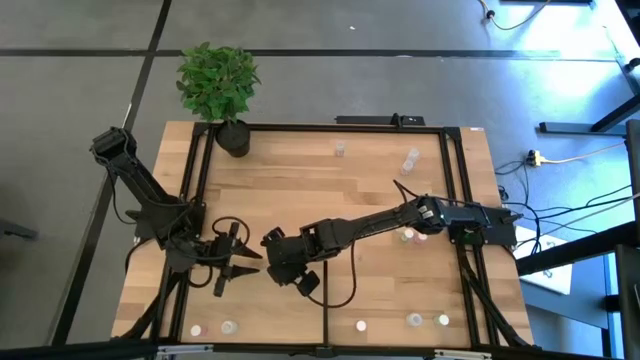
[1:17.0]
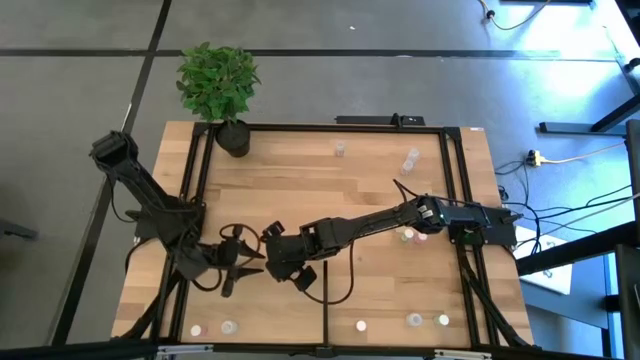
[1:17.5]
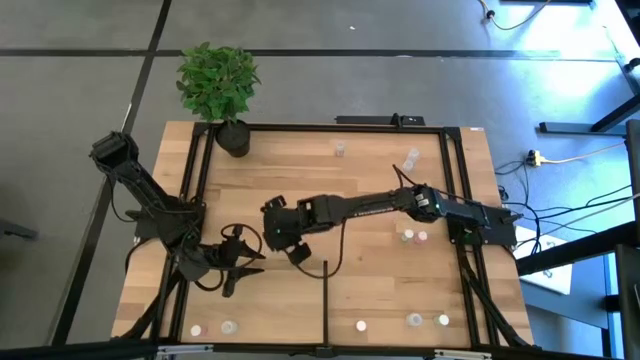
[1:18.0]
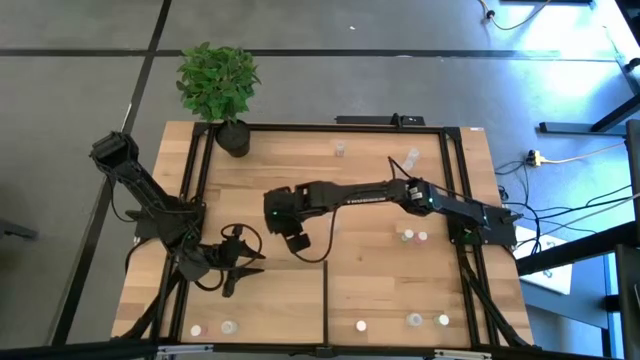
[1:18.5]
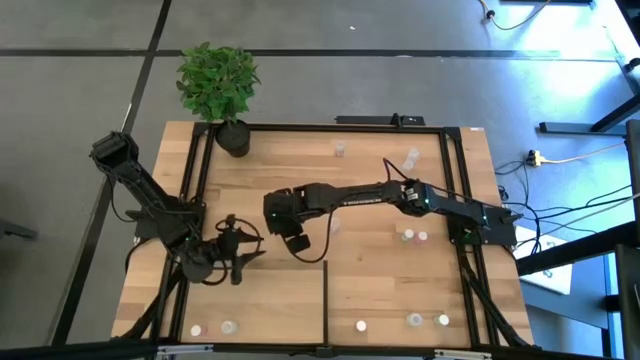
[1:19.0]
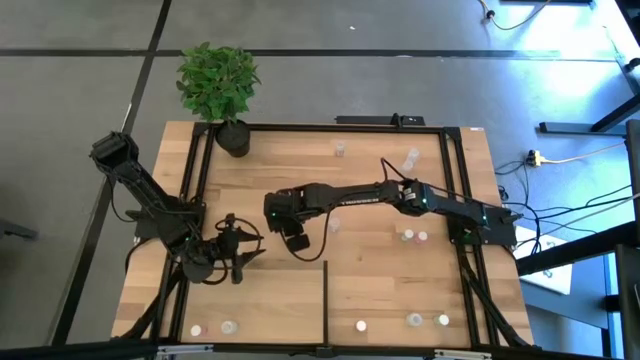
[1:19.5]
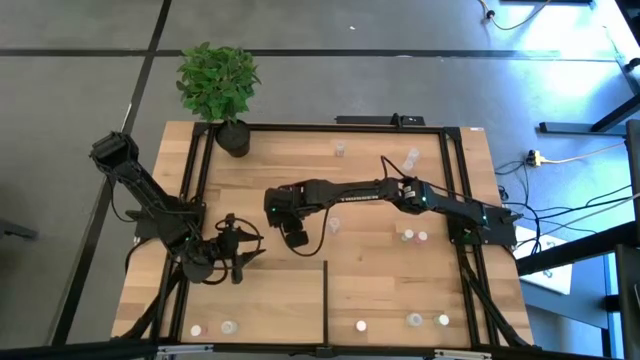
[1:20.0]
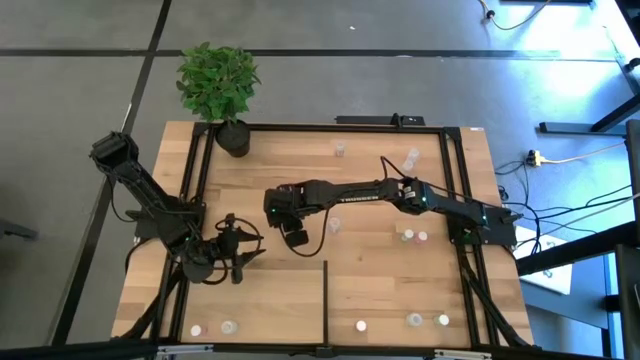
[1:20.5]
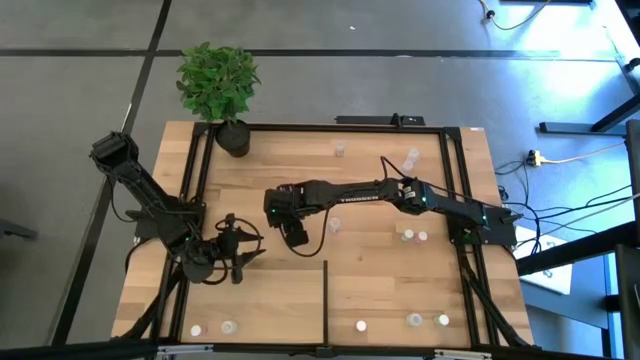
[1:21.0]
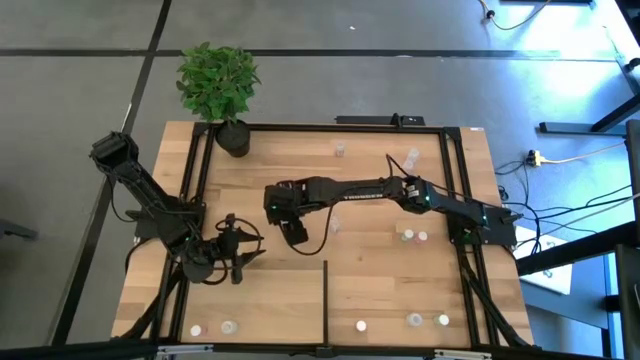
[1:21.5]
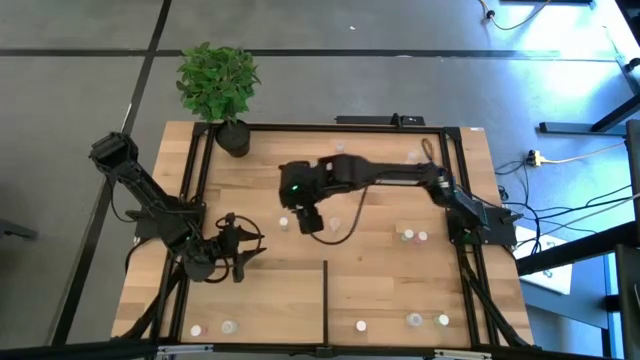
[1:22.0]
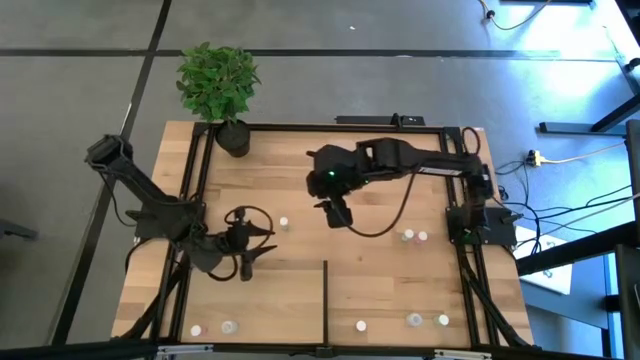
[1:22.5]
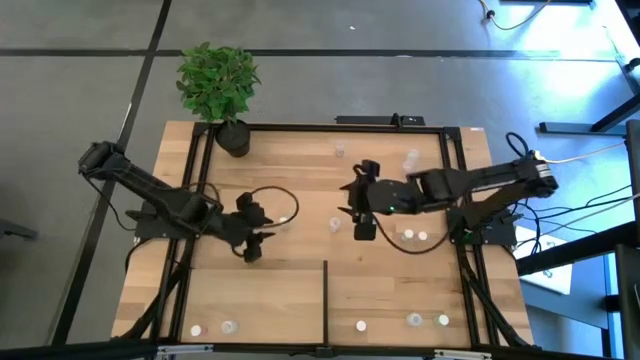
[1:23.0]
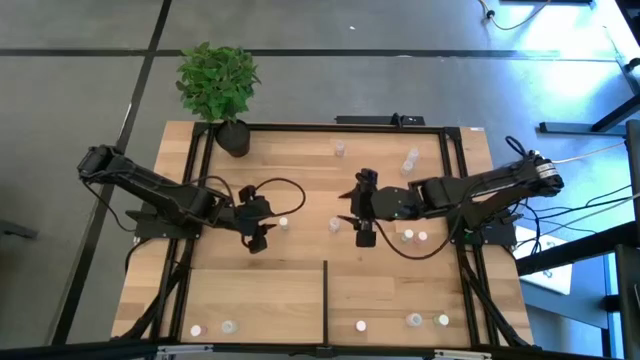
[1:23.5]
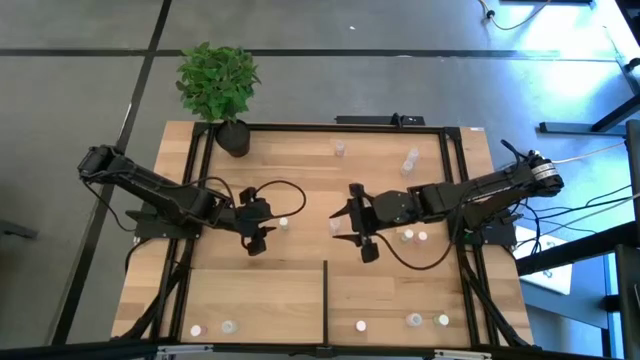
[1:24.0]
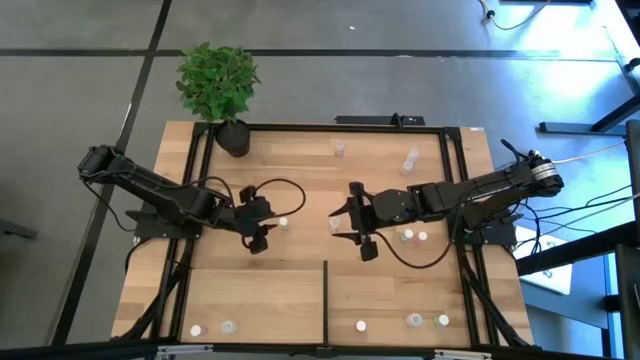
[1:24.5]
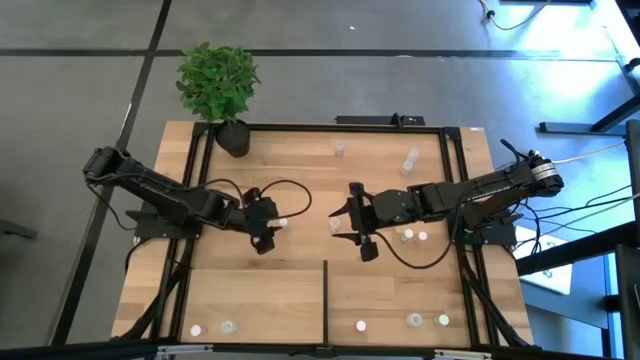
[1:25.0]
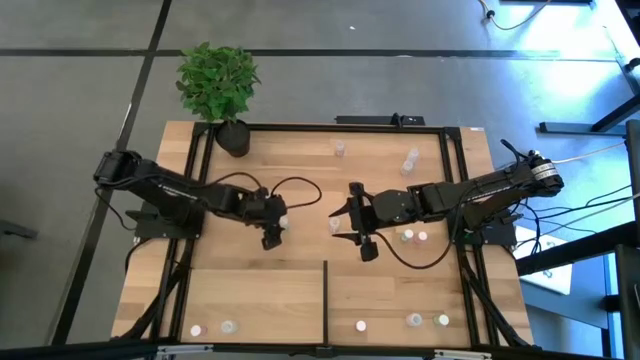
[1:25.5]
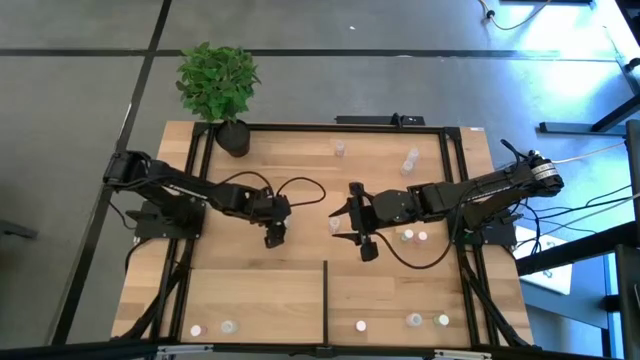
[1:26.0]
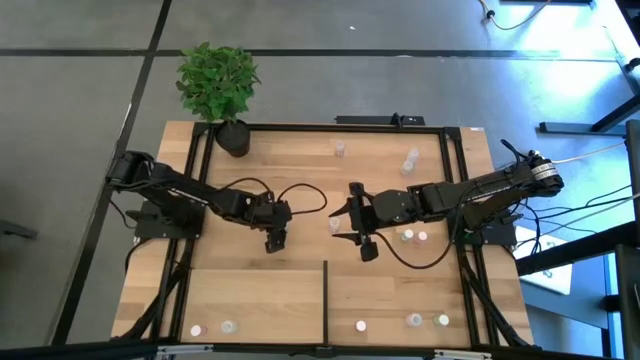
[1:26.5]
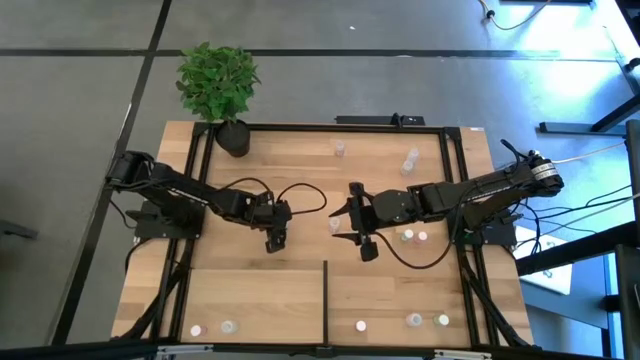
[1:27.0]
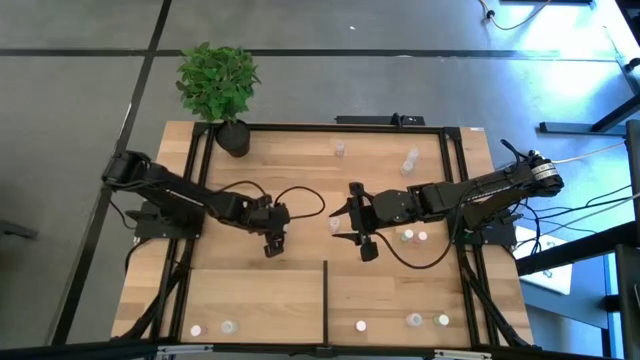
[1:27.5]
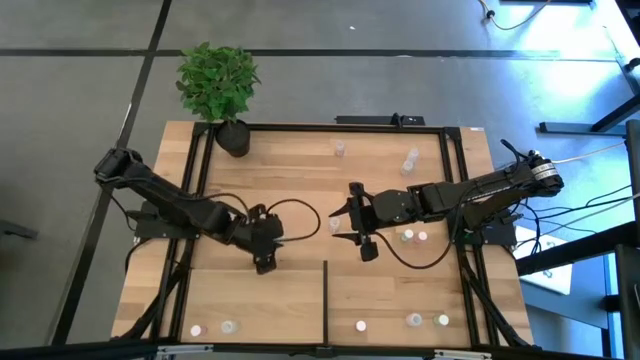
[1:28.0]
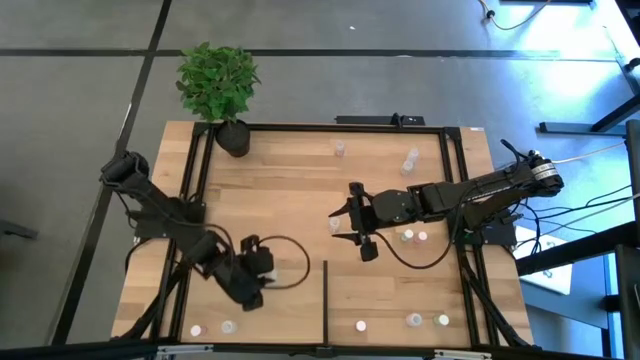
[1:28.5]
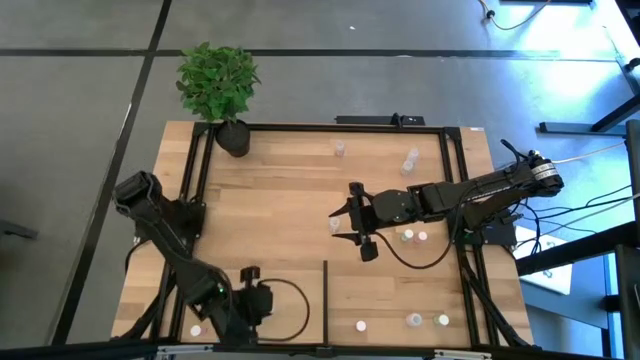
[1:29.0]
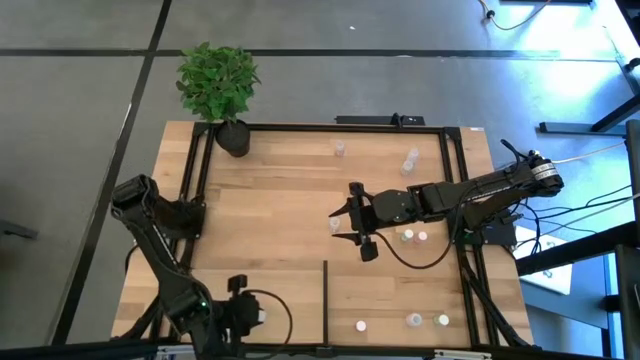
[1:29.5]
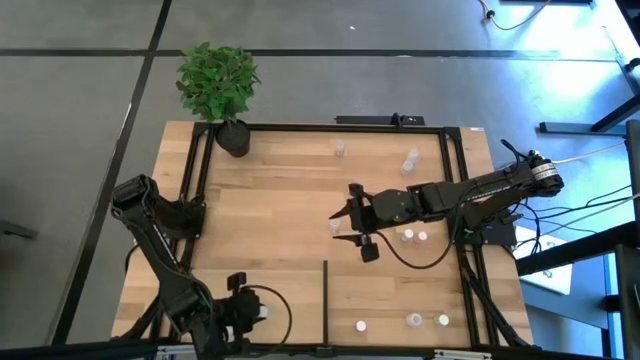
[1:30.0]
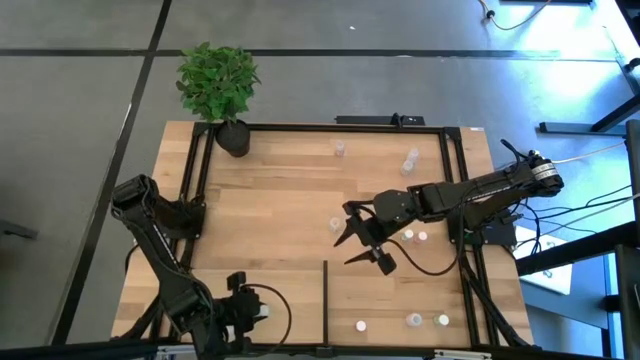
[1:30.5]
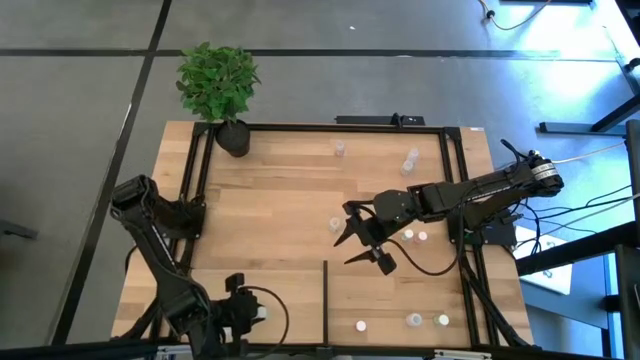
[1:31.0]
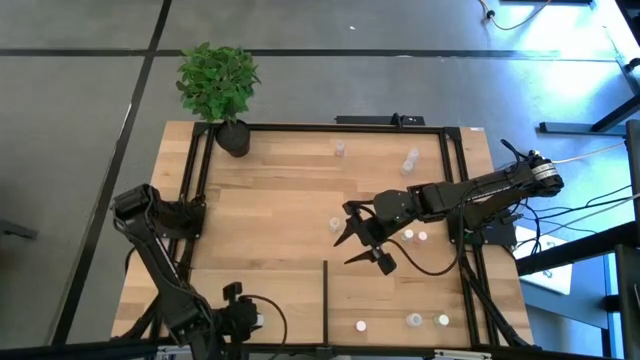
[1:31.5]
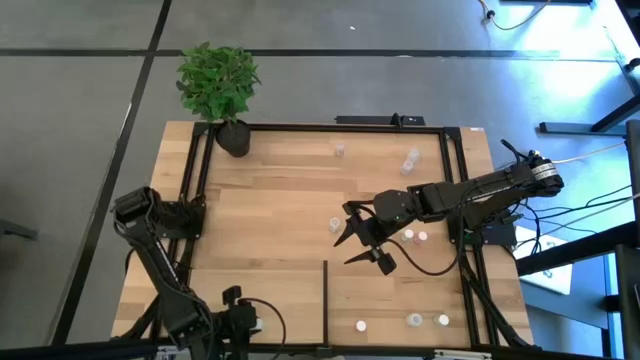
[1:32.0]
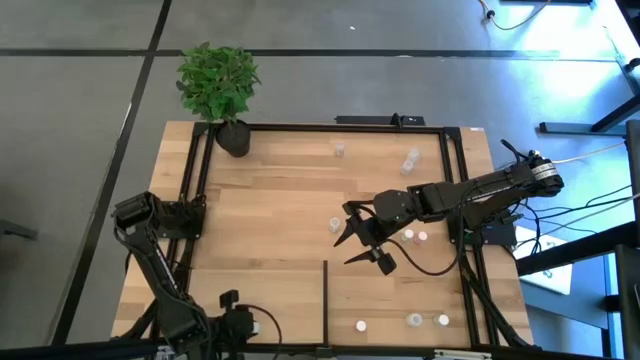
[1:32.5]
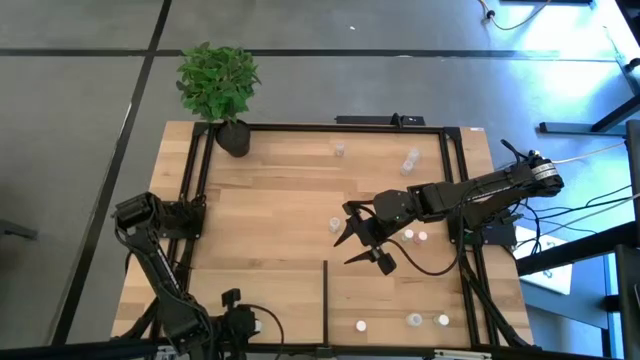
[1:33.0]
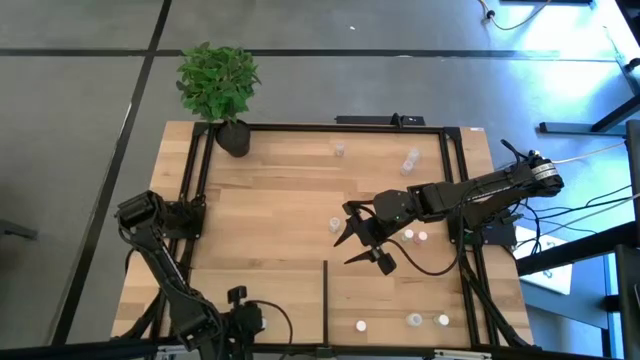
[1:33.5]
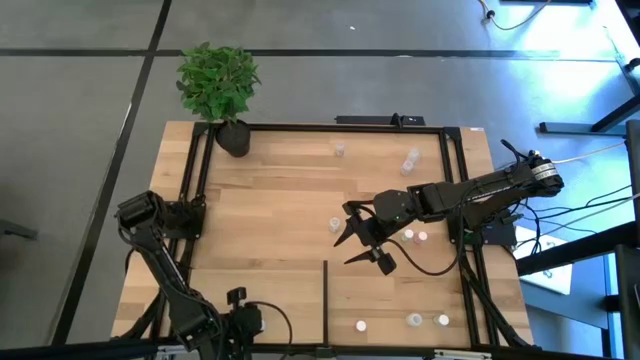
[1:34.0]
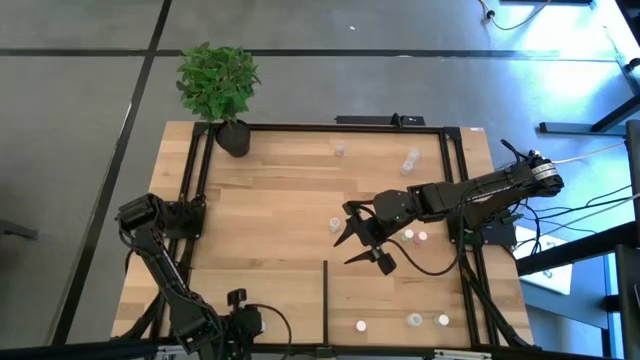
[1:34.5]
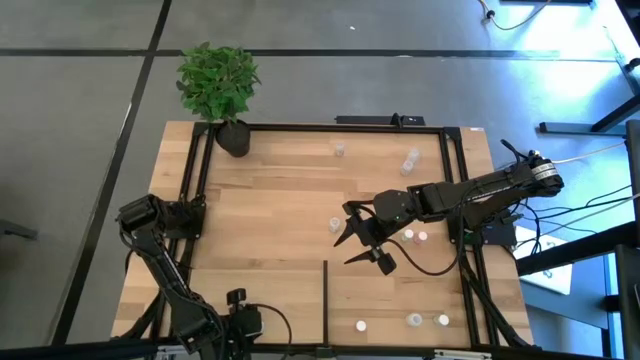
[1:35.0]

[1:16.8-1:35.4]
Task: Pick and place medicine bottles onto shelf by color
Put the top left green pill bottle on the shelf

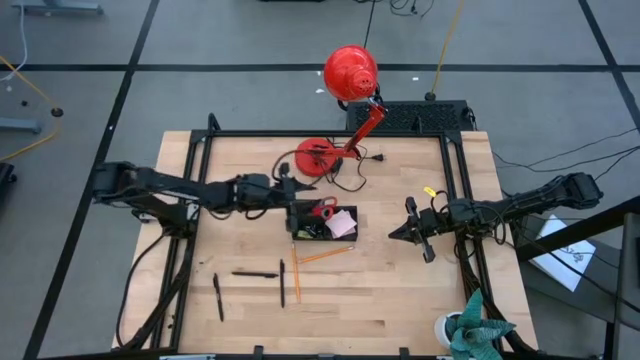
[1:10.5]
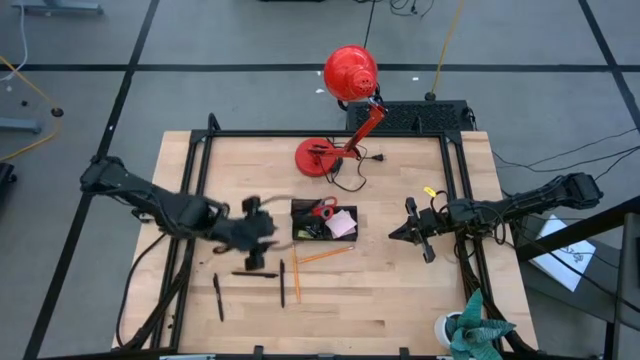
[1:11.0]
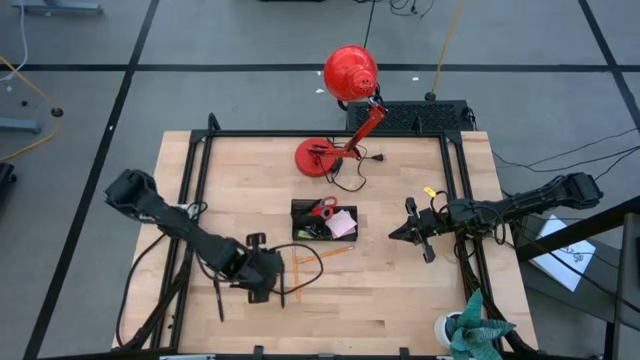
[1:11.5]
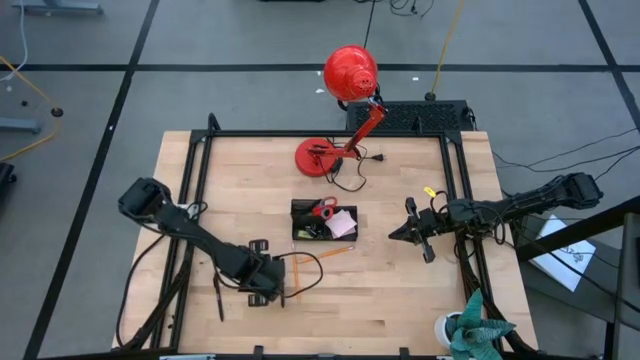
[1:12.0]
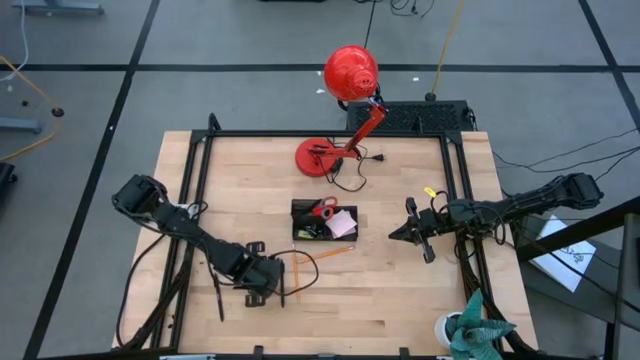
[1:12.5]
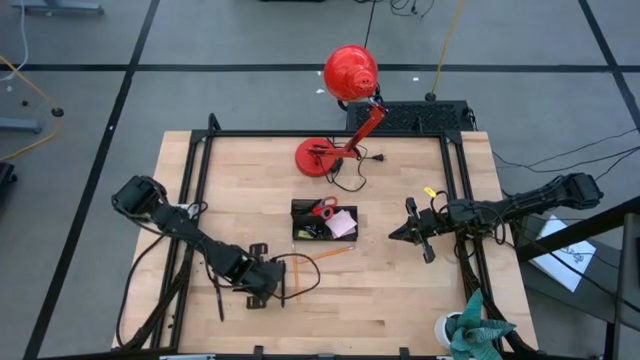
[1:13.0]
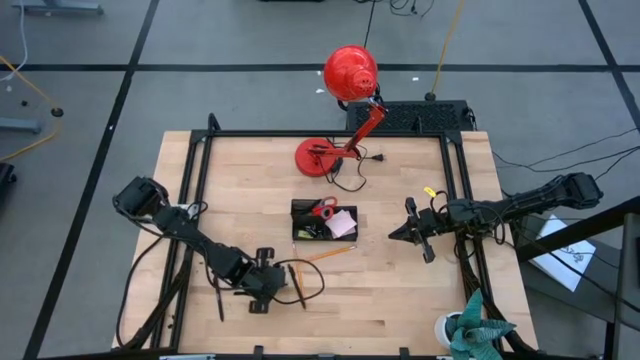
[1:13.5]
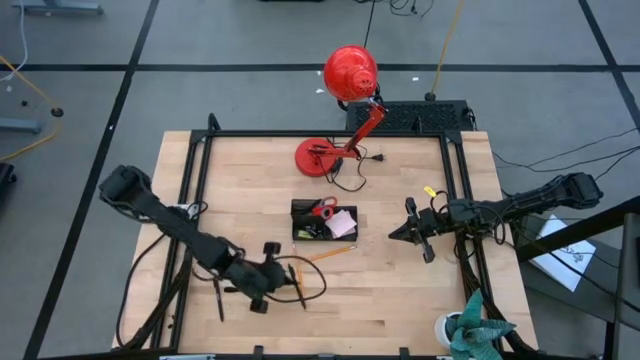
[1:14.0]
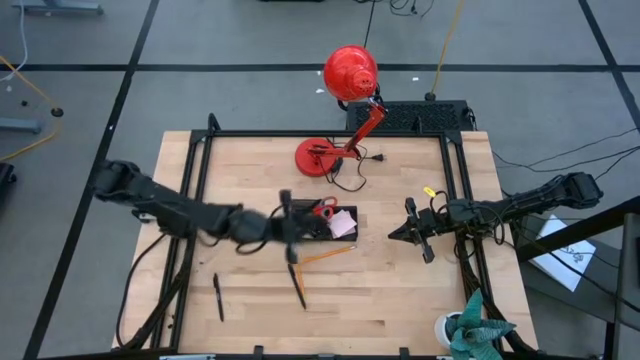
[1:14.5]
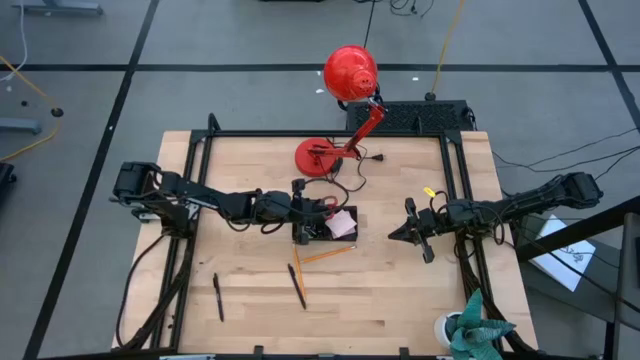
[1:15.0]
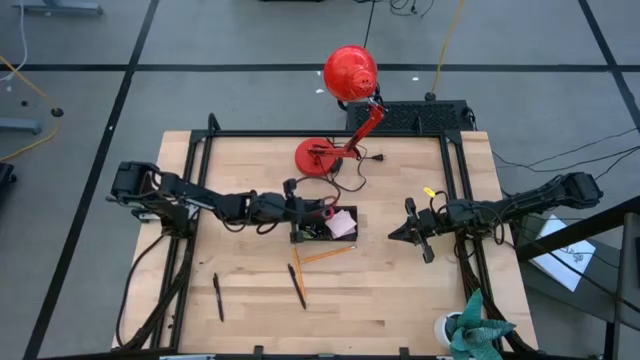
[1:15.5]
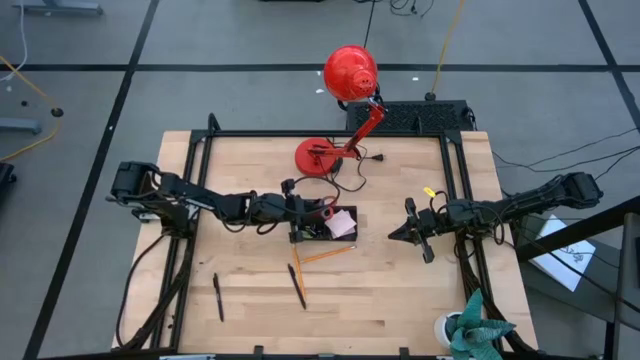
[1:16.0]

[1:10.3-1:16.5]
Task: Pick and place office supplies into organizer
Put the middle black pen into the desk organizer
